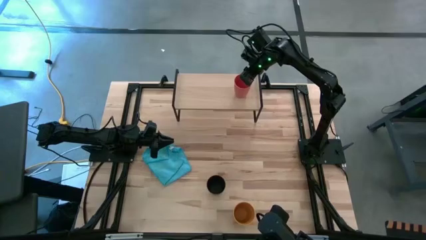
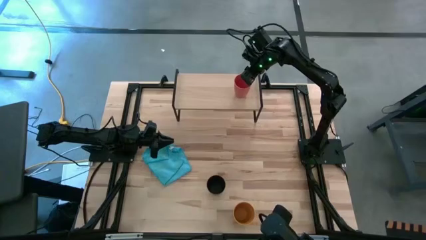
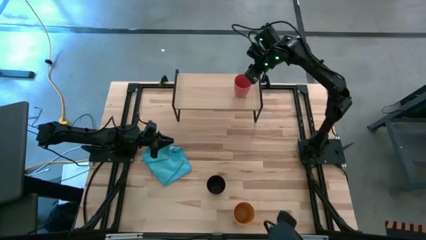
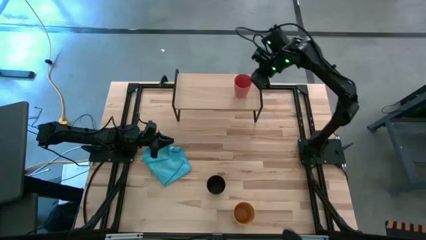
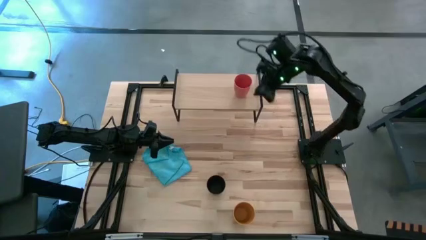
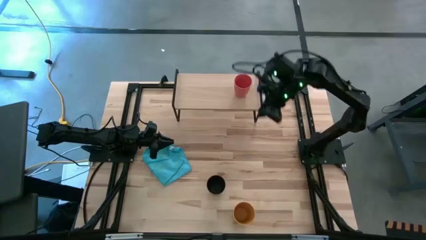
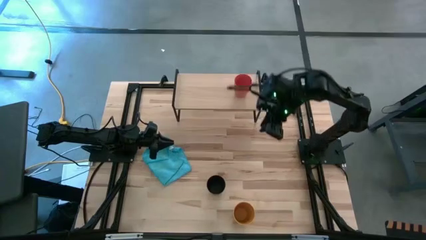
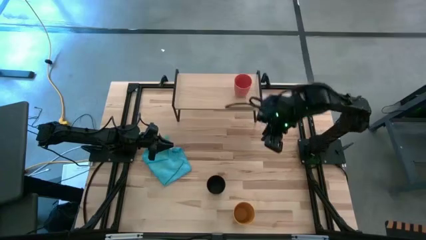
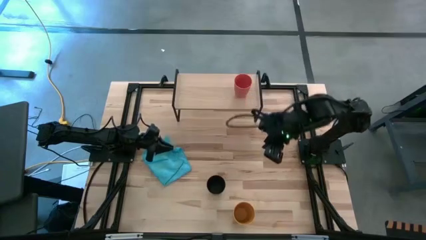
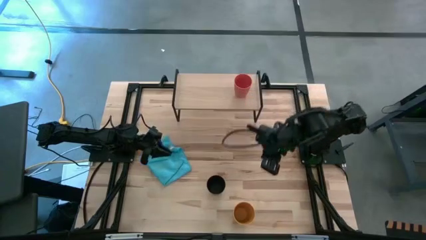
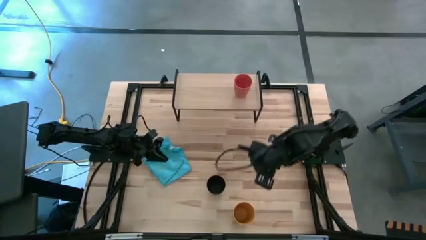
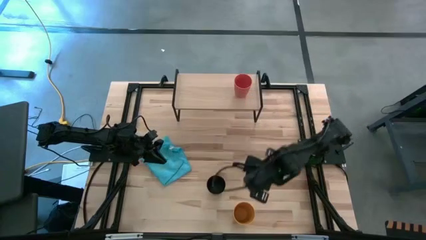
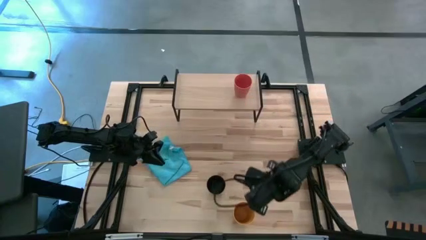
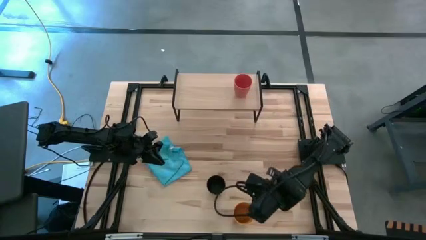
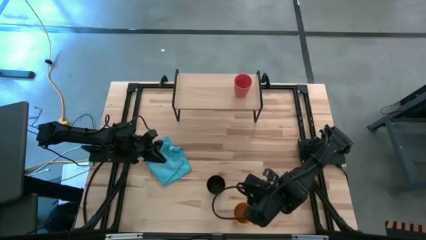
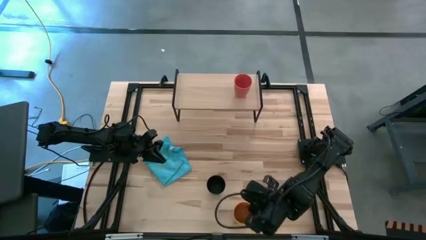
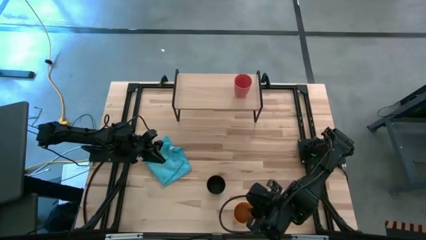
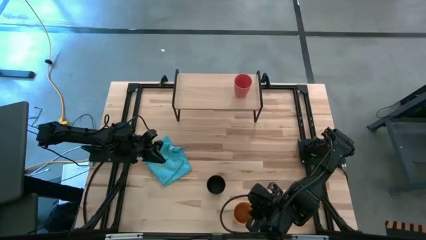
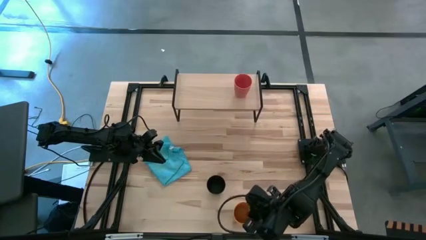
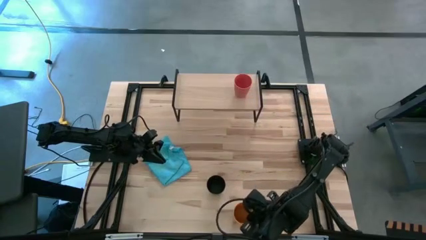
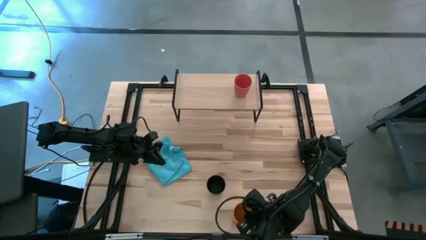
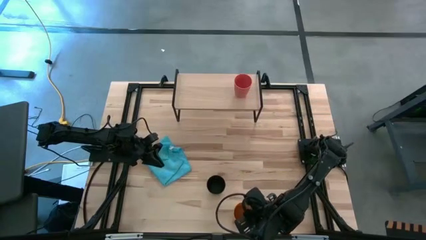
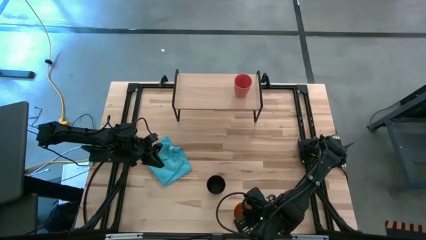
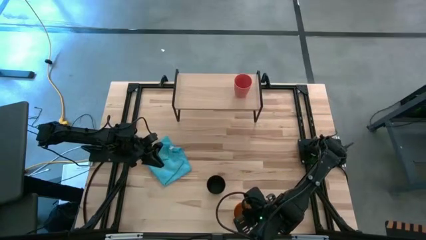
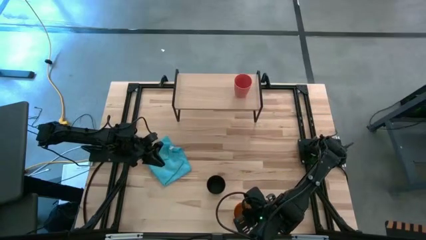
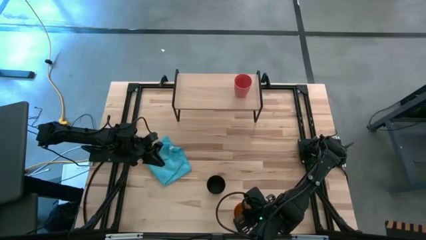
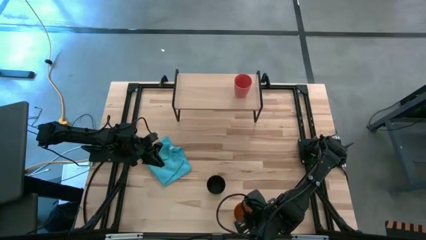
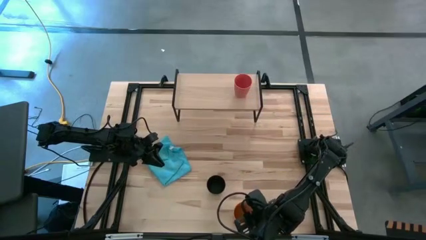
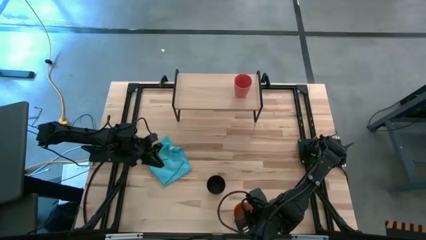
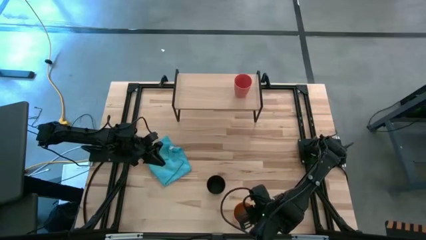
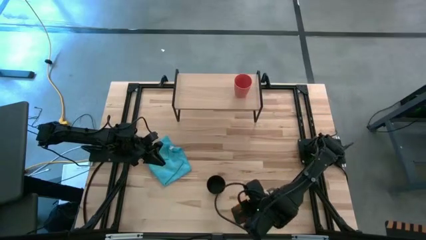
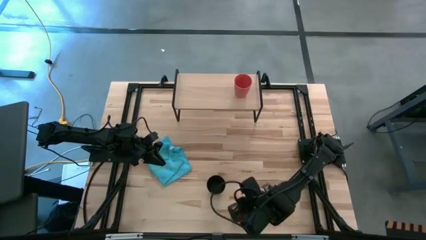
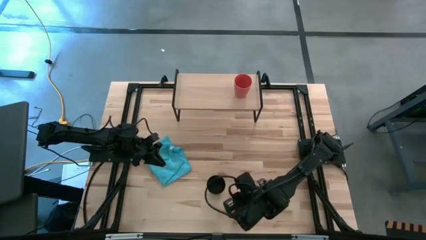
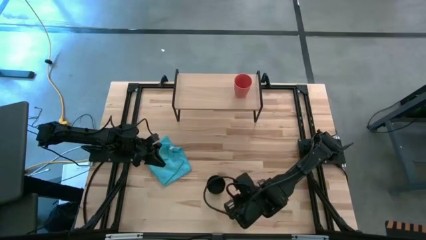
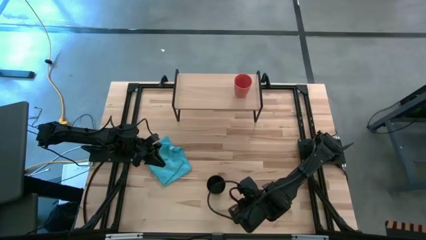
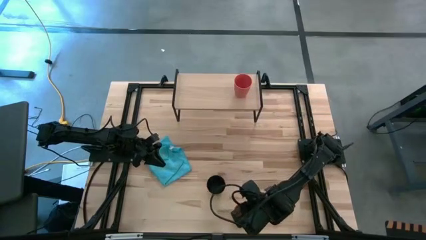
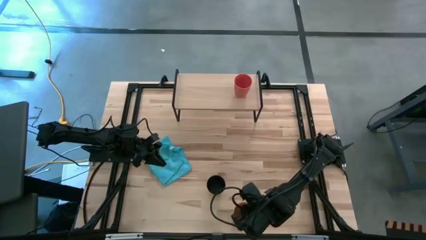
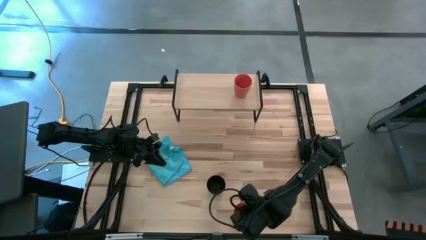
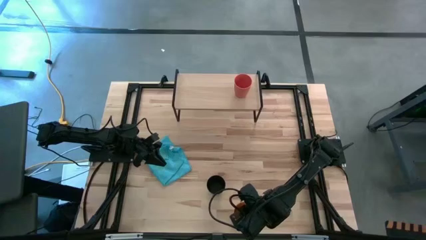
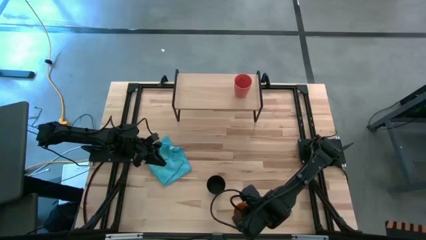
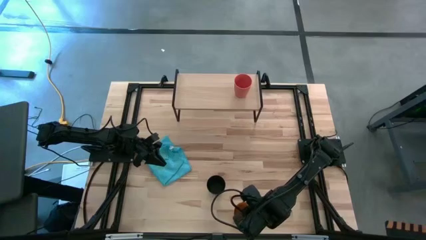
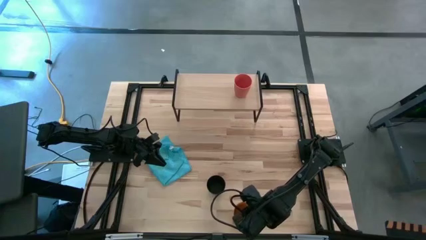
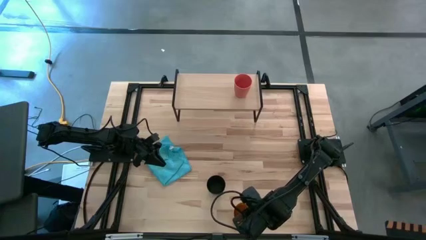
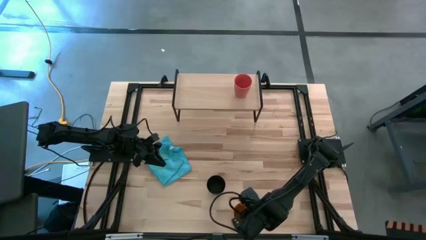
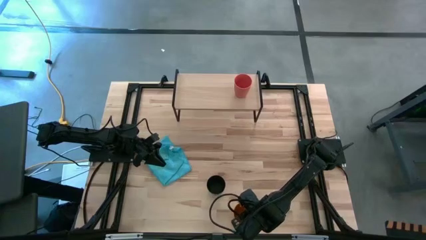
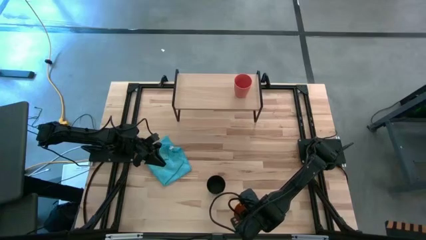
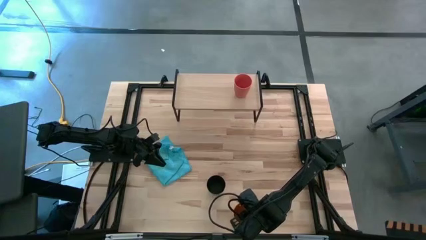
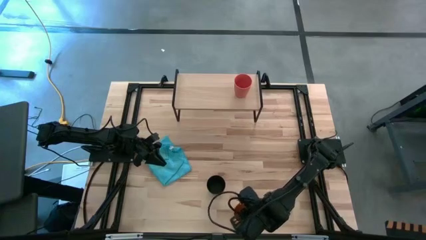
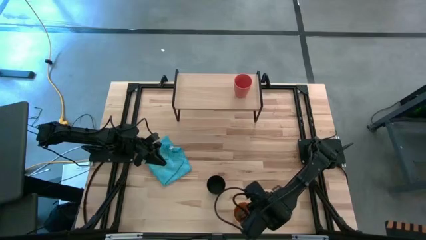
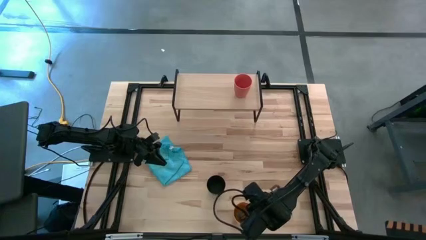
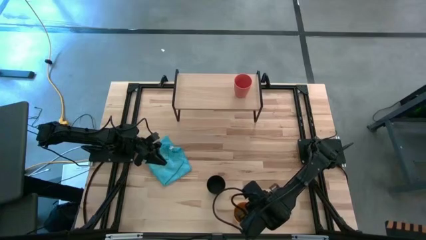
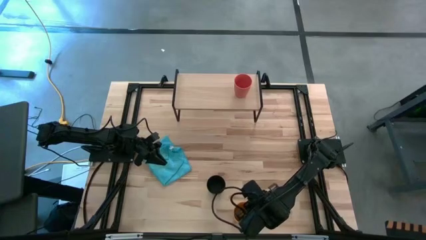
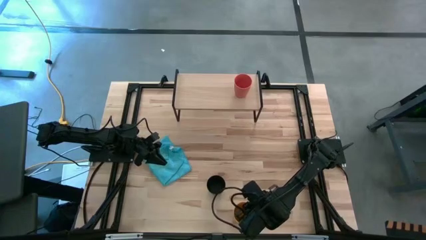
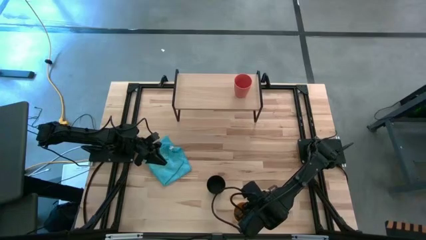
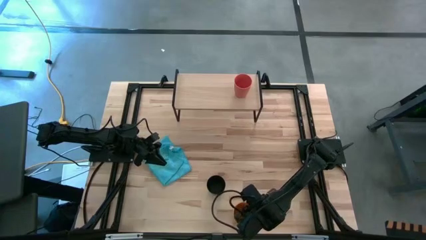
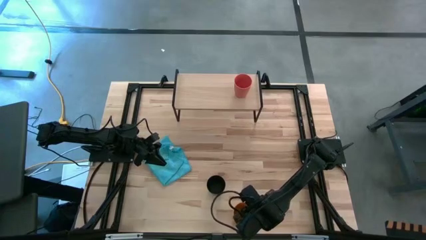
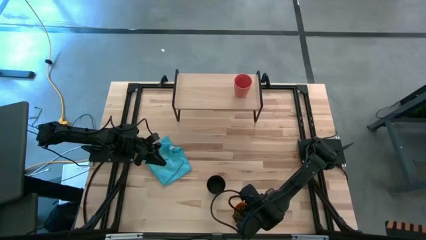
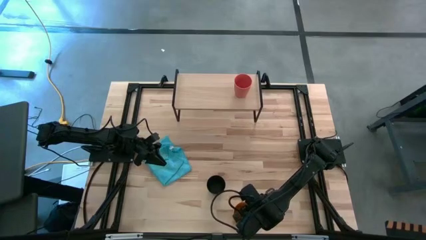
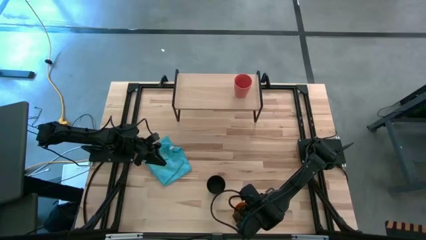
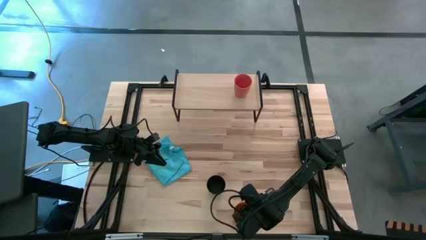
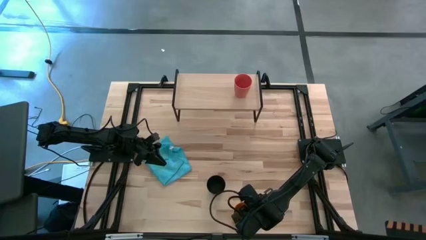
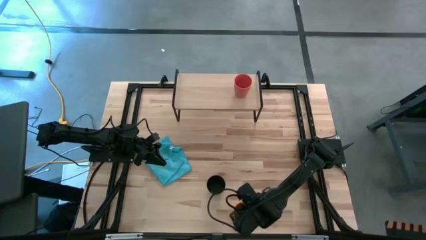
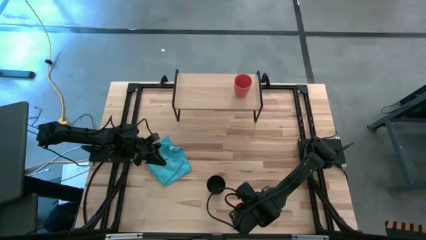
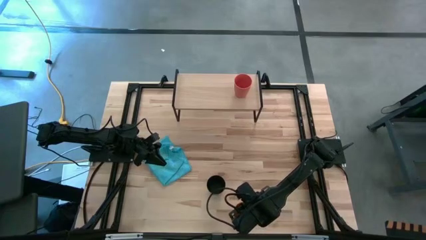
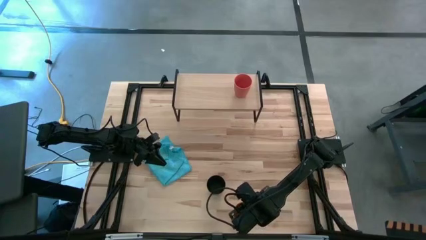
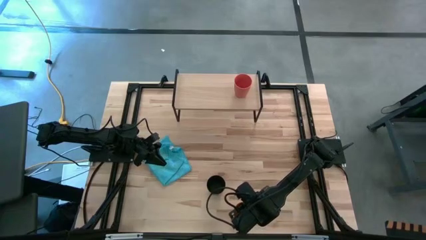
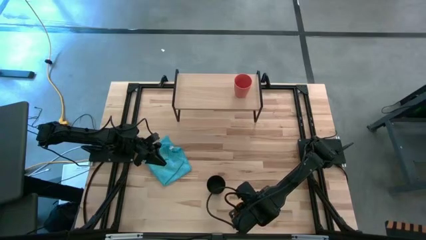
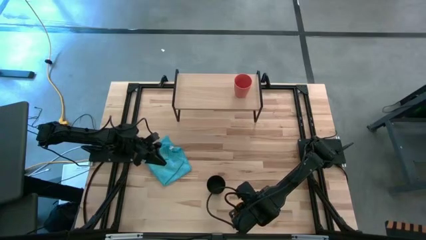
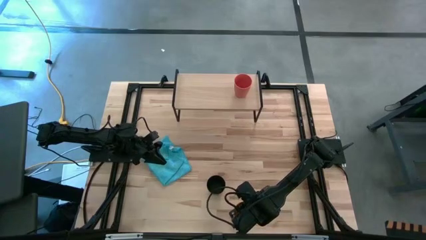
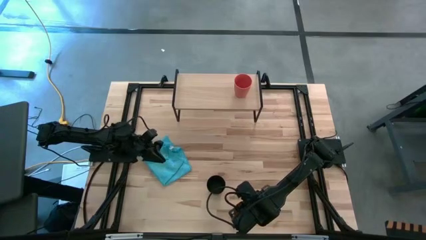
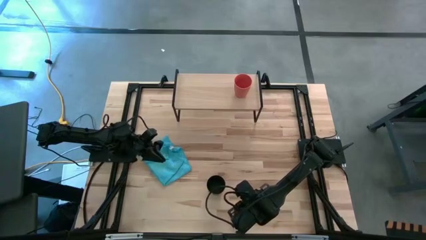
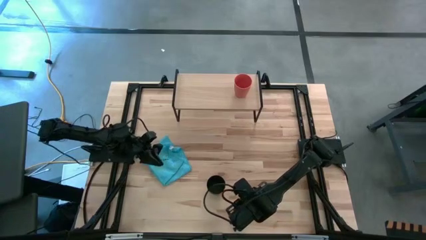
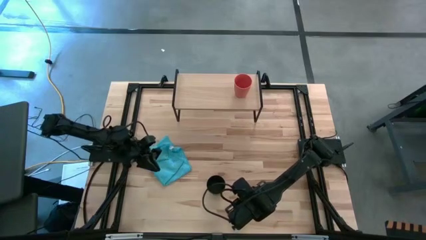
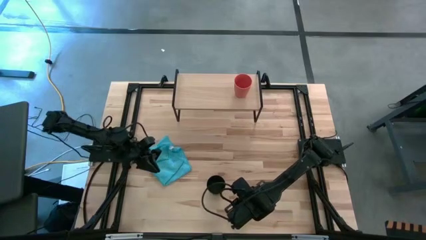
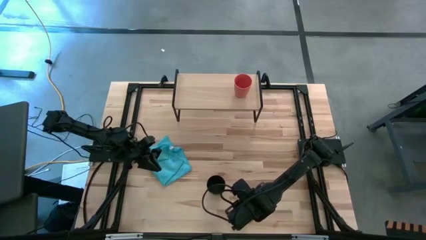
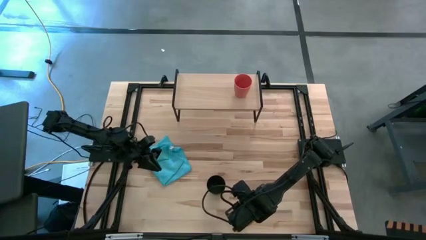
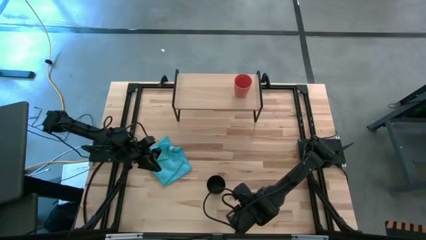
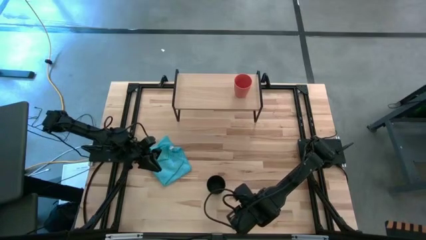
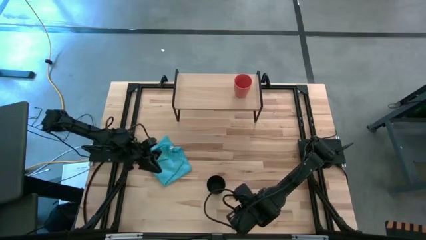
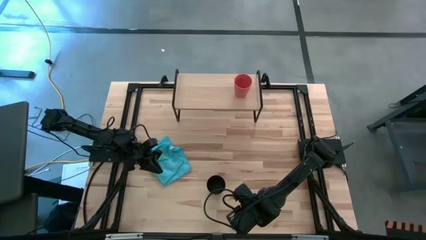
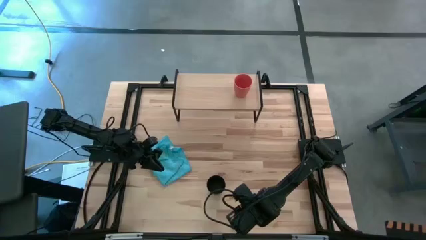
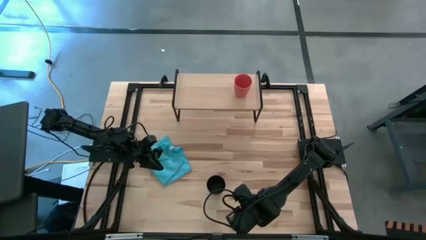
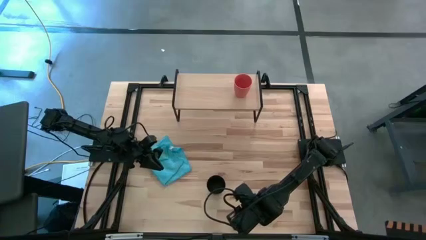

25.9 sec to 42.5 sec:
Task: Stack small to large cups/mugs on shelf
Adjust the yellow cup
